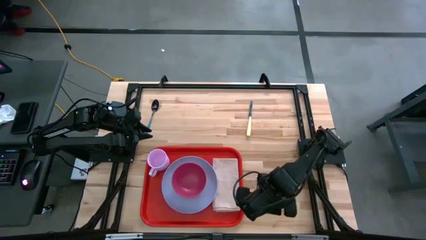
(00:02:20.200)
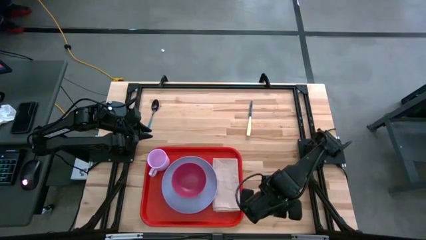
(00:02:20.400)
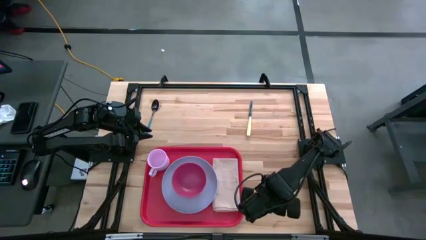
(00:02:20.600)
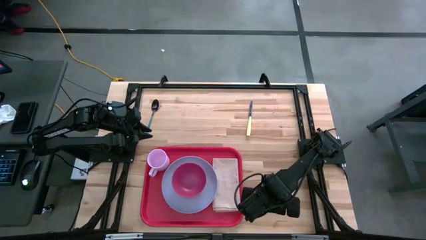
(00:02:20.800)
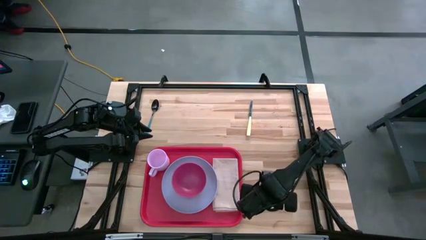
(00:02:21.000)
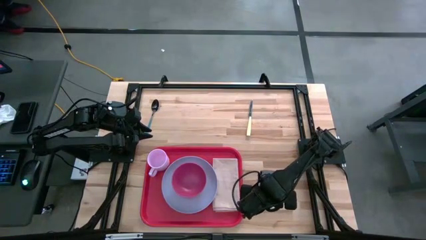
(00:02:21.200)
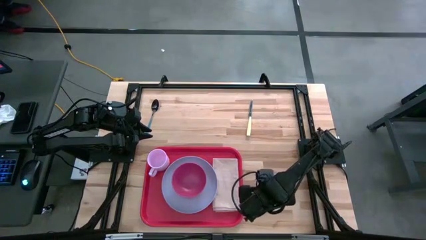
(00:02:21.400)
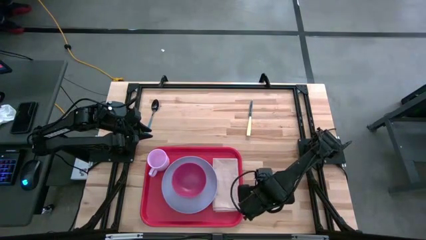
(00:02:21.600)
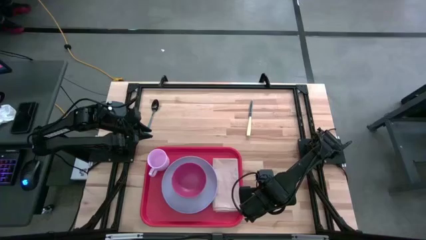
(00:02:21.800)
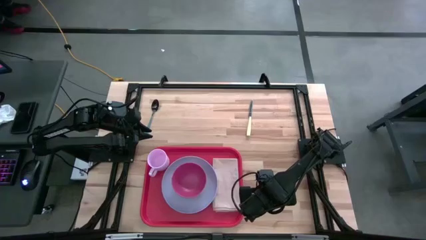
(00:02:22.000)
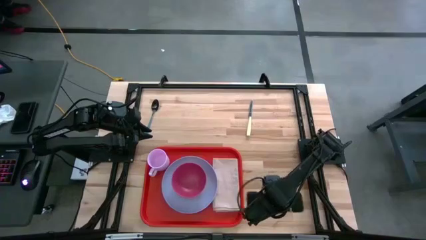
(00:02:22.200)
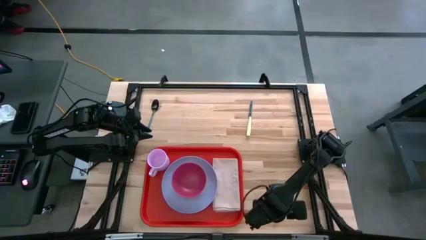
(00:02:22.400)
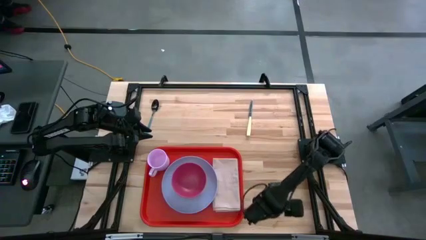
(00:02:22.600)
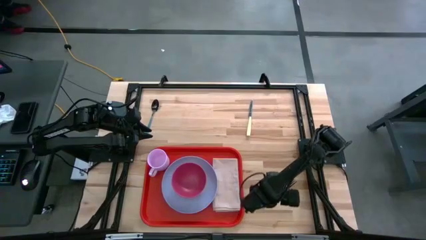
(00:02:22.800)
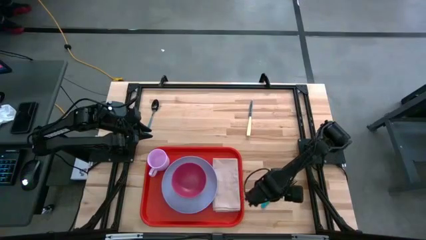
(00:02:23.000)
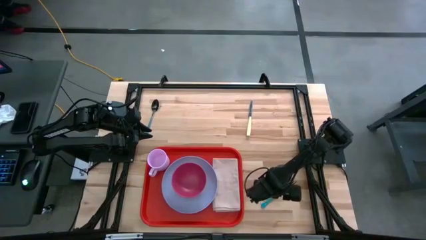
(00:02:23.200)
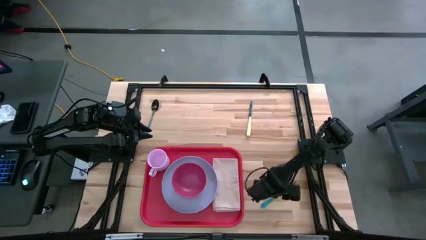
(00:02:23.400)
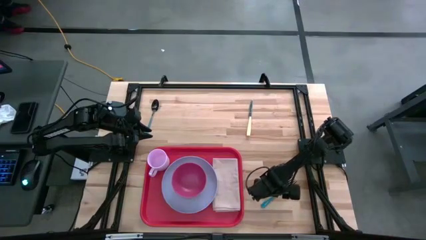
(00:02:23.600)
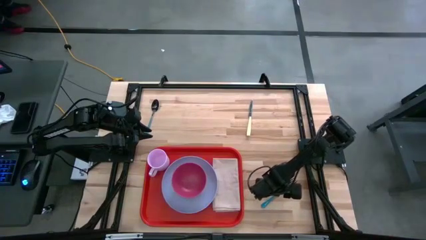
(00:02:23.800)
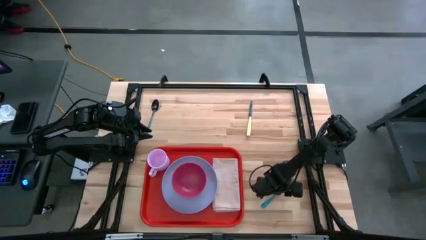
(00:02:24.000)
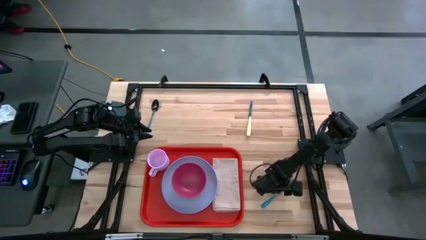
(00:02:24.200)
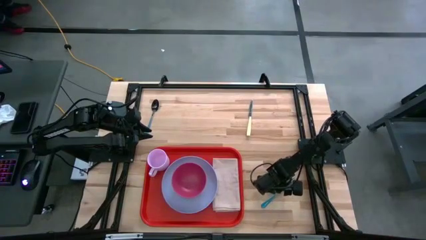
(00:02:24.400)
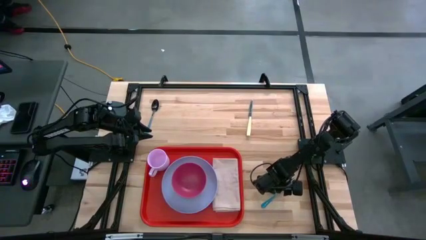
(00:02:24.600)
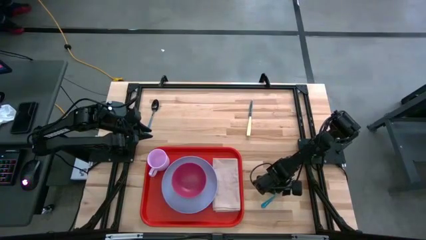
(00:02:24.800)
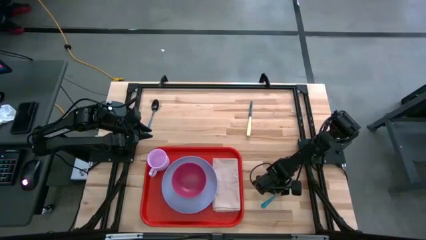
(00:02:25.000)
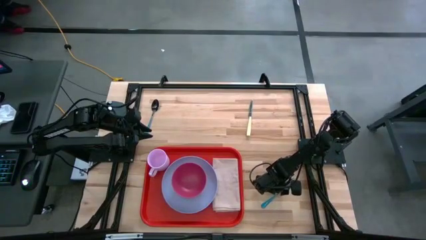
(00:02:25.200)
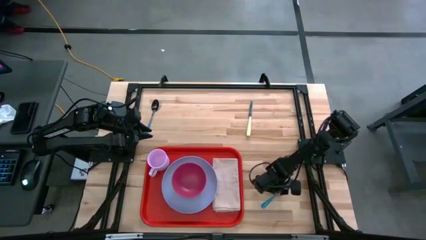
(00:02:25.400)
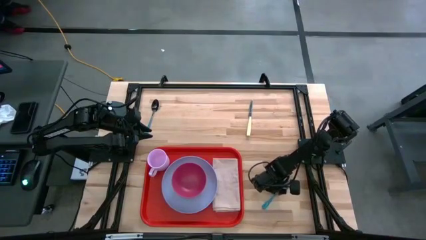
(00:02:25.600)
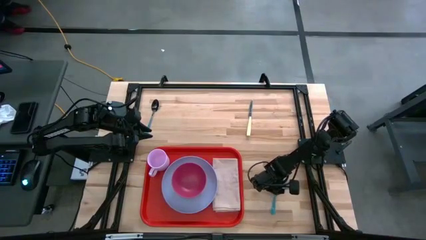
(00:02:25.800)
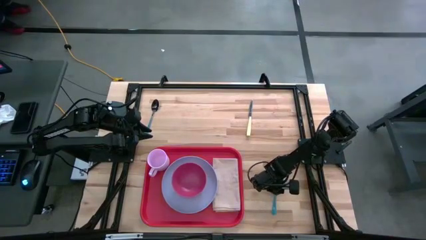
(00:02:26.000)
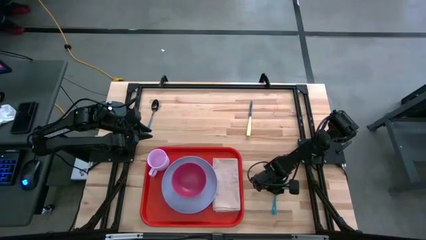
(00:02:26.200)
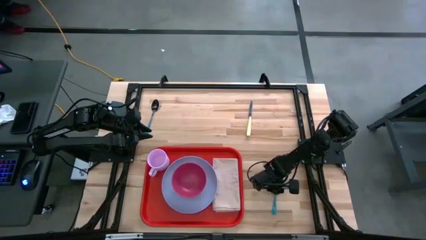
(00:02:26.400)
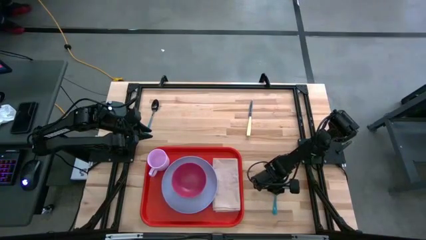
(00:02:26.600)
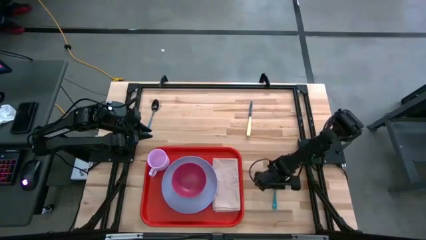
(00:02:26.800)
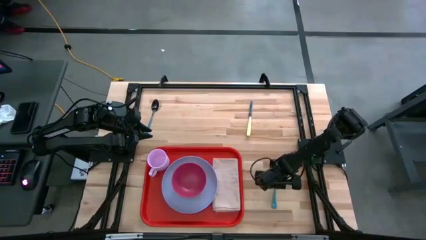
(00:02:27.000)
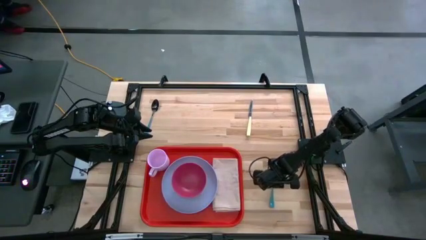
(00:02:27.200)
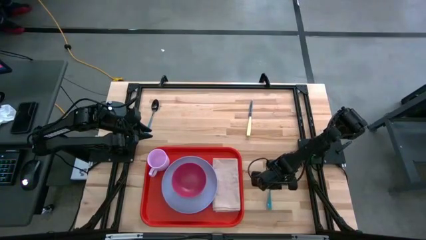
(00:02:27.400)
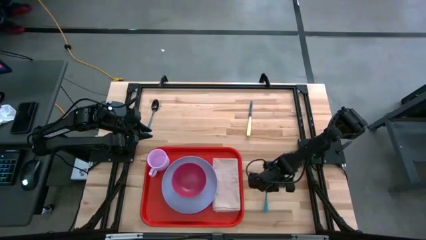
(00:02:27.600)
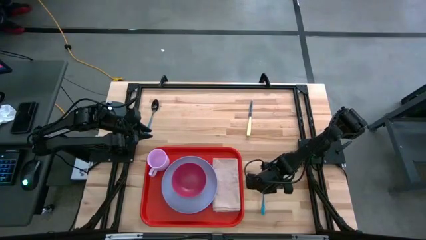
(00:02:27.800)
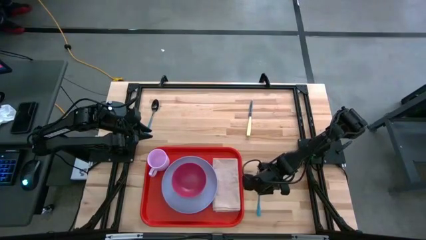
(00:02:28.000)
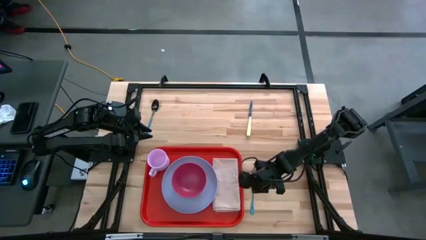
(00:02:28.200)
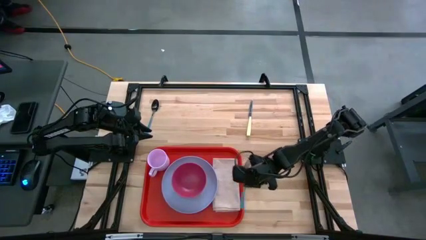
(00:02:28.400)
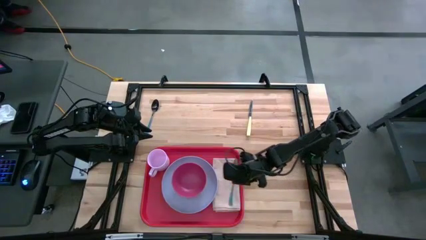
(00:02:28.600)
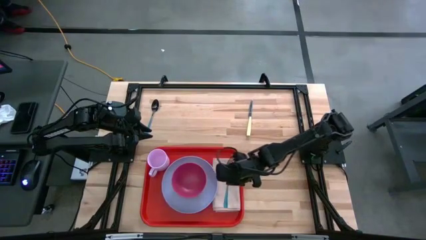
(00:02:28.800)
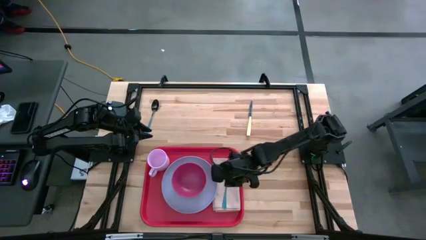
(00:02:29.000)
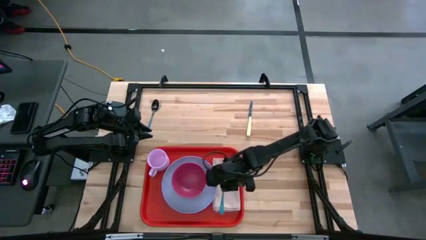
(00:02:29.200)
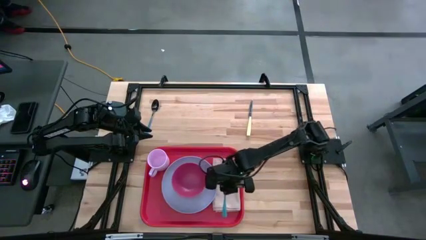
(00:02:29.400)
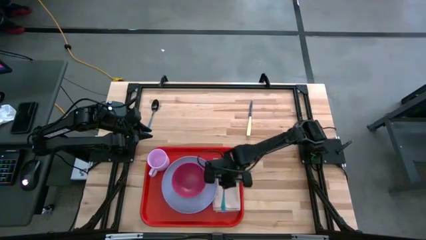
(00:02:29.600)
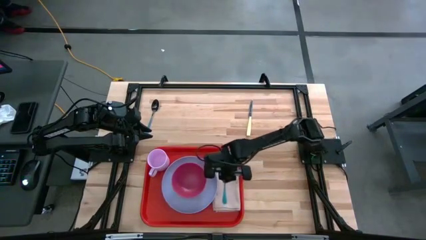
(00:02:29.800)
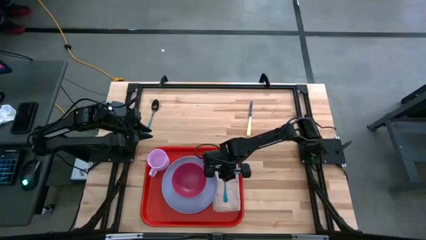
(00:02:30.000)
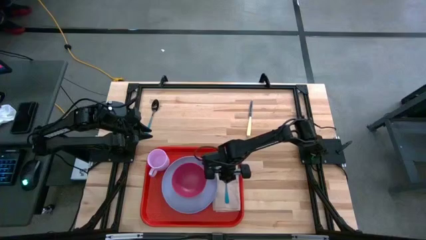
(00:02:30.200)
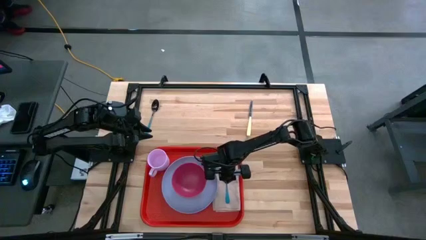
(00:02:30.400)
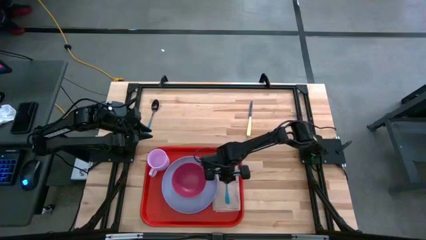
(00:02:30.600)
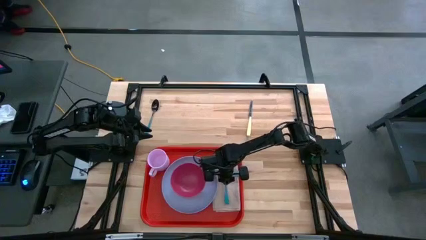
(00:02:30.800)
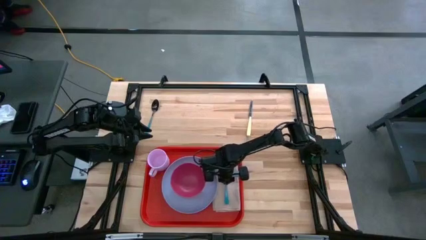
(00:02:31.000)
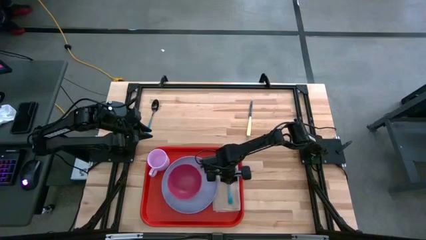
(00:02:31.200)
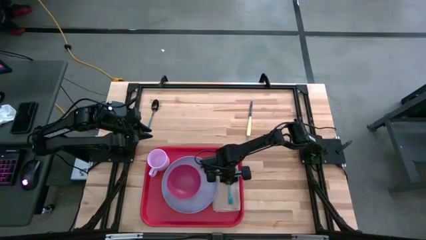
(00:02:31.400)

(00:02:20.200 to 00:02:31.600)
Task: Set up tray
Put the blue fork on the peach napkin on the orange serving tray

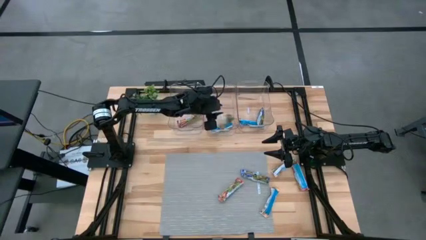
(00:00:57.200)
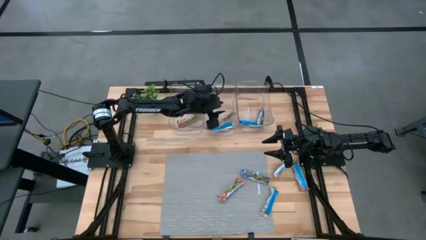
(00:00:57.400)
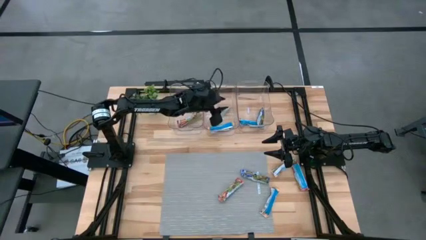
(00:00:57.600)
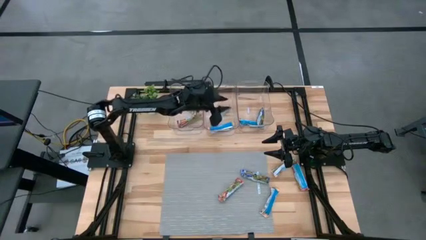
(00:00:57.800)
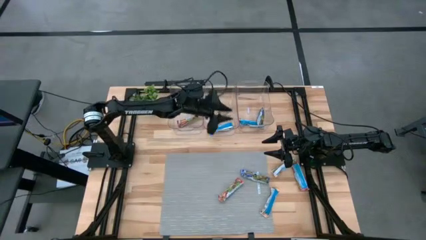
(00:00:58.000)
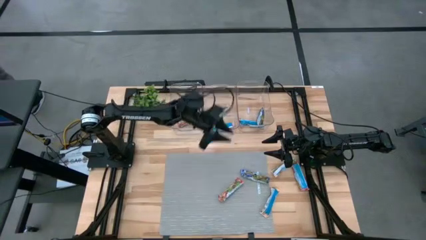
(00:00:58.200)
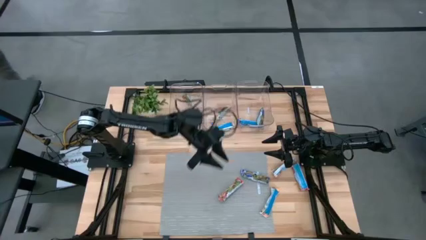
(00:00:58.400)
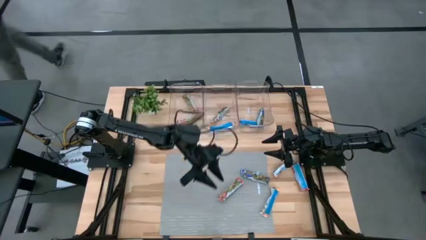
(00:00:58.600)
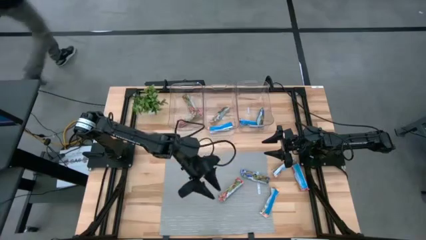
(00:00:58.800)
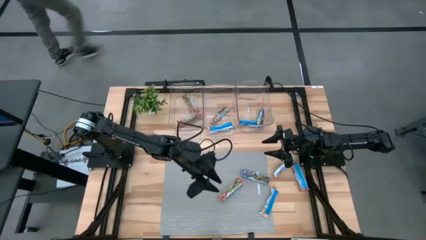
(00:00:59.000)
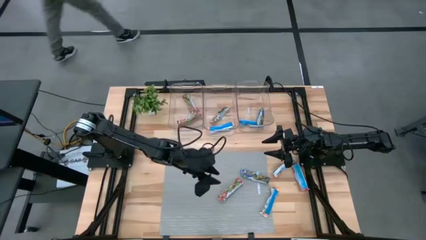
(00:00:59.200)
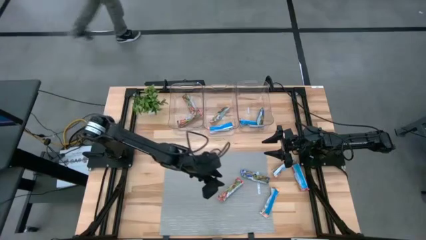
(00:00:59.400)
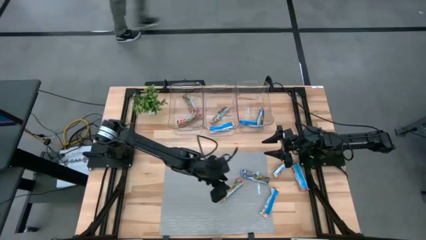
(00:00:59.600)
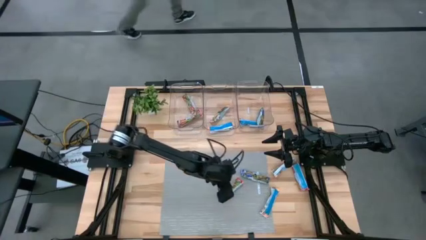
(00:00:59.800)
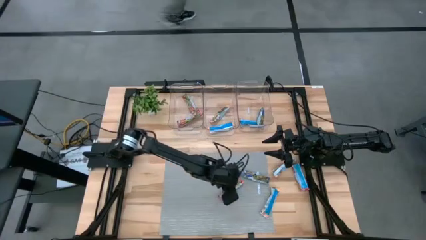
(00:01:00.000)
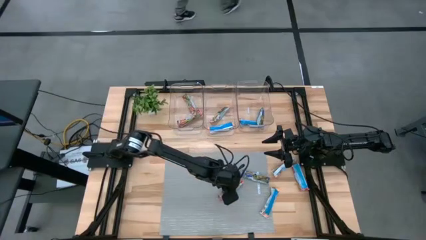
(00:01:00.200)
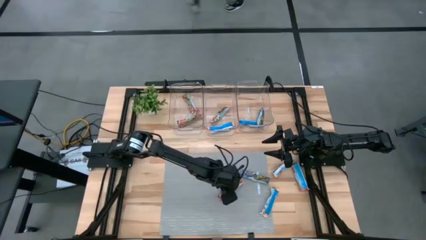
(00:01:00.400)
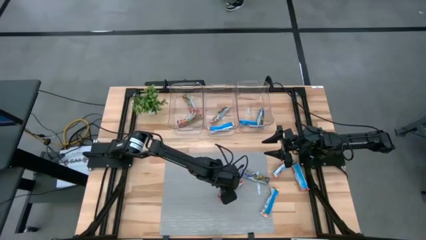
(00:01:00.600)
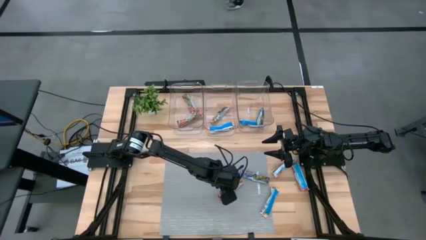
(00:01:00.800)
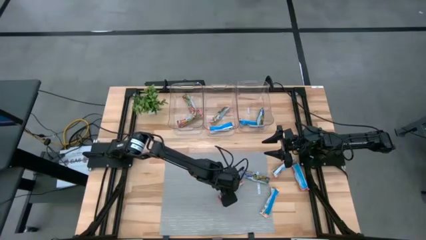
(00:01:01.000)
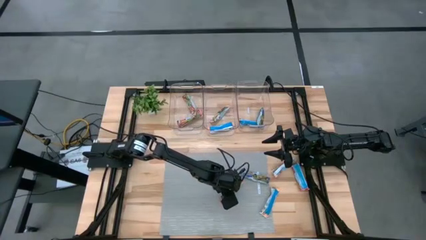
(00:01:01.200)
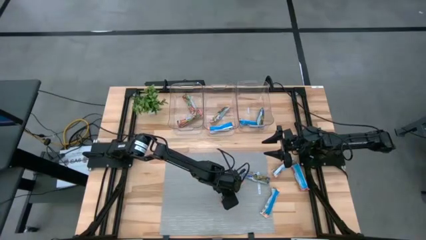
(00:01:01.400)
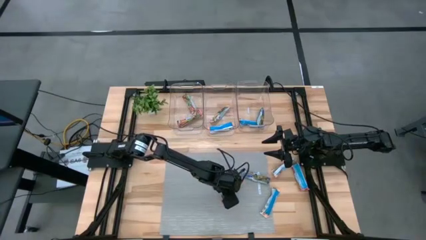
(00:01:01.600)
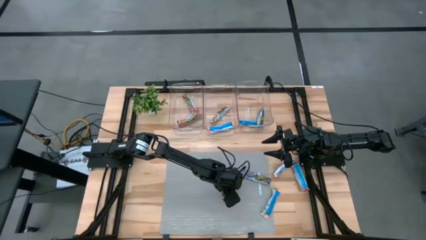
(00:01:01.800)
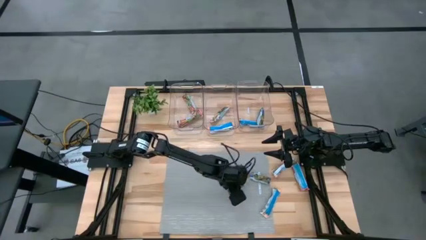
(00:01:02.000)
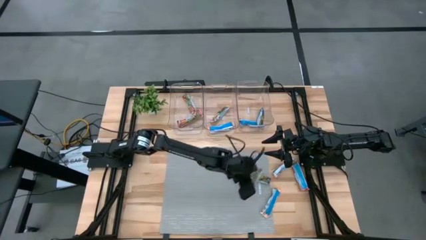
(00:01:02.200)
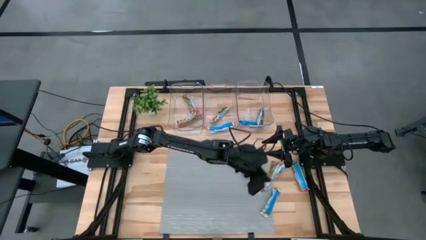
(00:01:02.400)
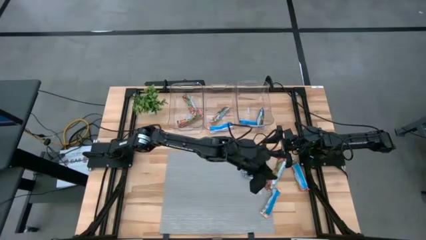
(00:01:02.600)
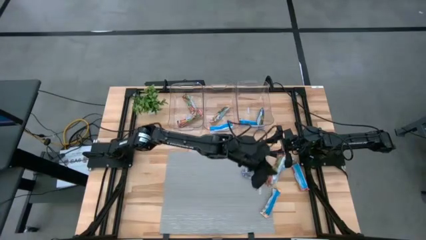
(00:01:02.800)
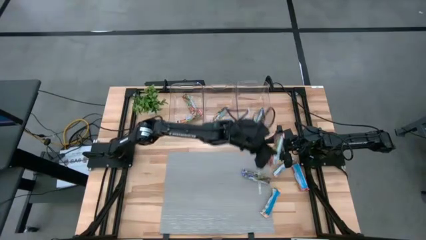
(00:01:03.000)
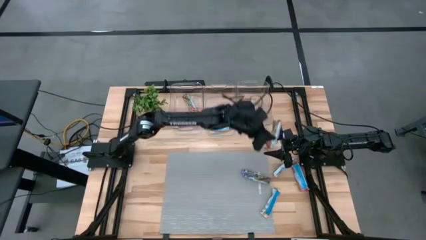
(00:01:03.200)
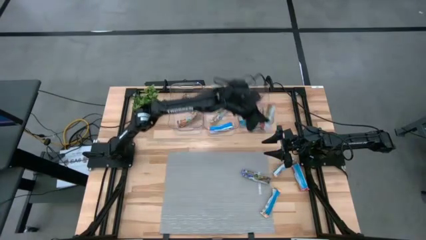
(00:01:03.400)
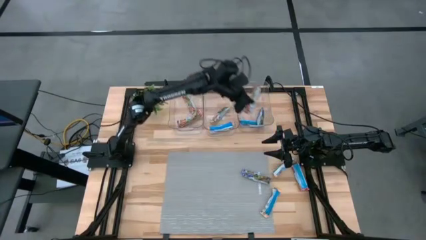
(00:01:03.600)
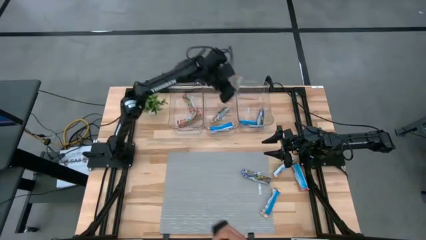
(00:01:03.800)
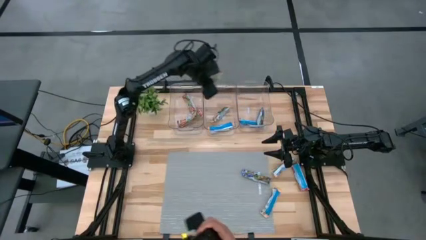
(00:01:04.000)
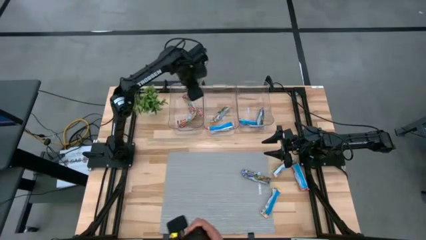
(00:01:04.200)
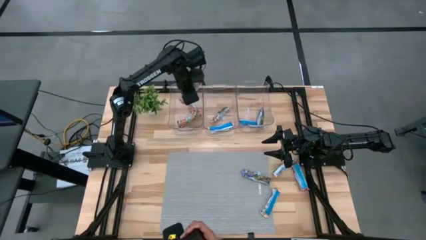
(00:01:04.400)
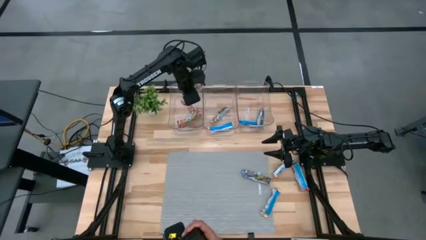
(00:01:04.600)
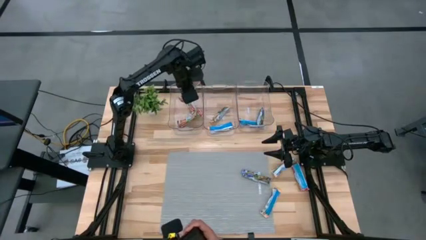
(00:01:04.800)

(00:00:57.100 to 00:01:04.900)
Task: Pick and place Granola Bars by type
Put the red granola bar into the left transparent bin
